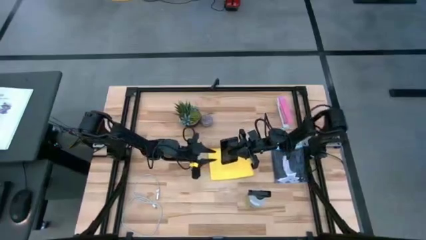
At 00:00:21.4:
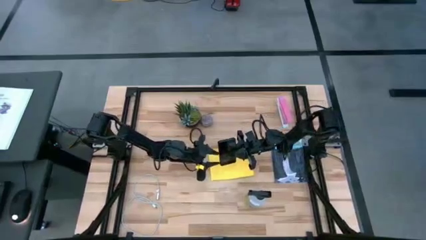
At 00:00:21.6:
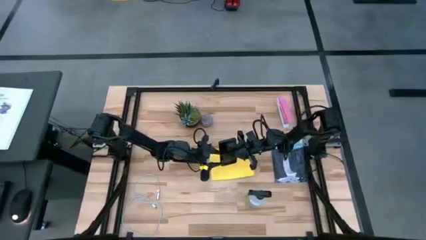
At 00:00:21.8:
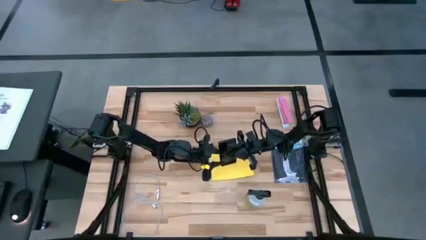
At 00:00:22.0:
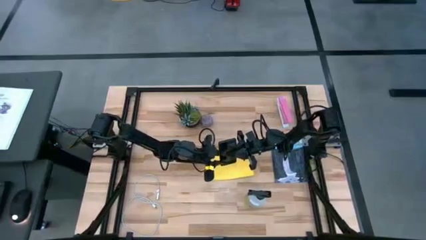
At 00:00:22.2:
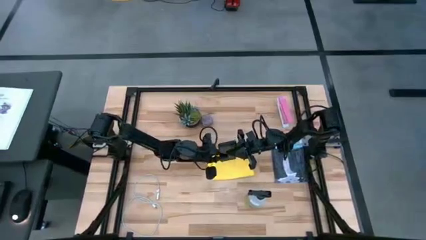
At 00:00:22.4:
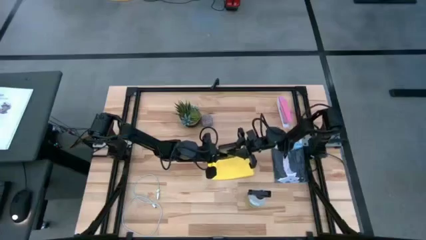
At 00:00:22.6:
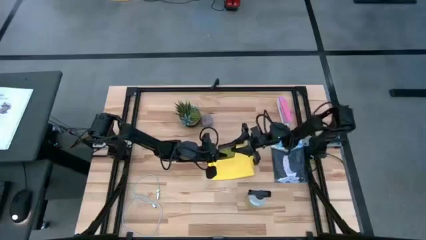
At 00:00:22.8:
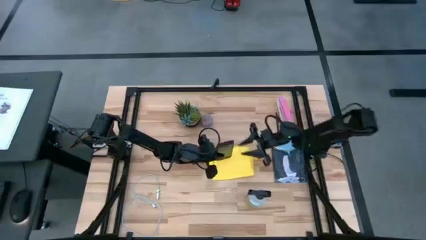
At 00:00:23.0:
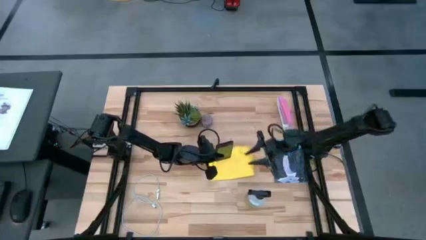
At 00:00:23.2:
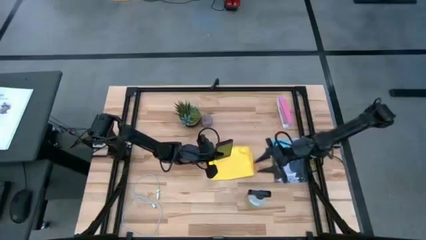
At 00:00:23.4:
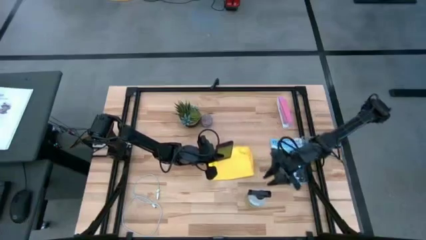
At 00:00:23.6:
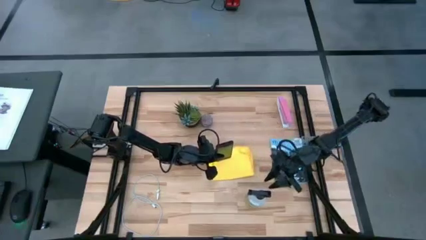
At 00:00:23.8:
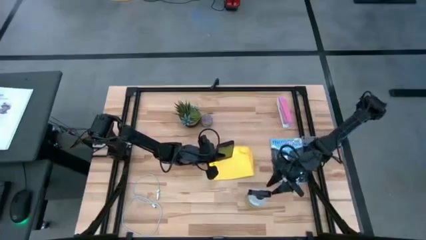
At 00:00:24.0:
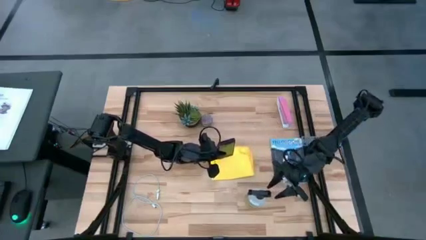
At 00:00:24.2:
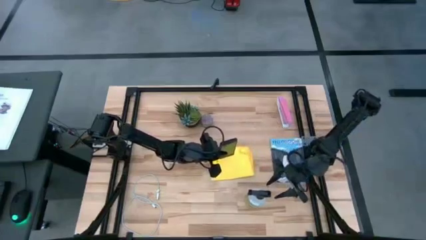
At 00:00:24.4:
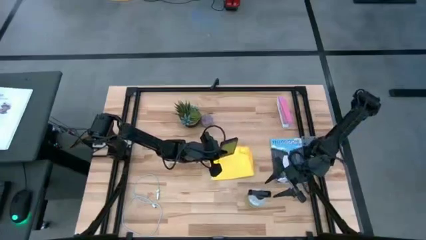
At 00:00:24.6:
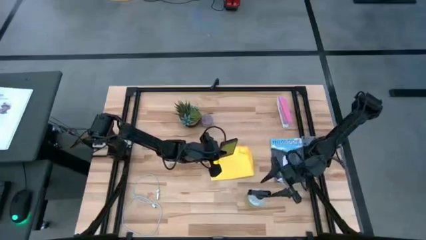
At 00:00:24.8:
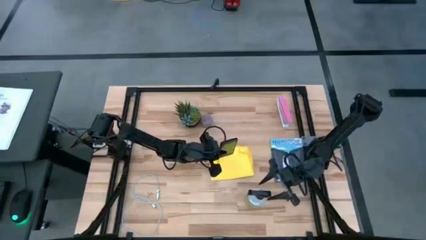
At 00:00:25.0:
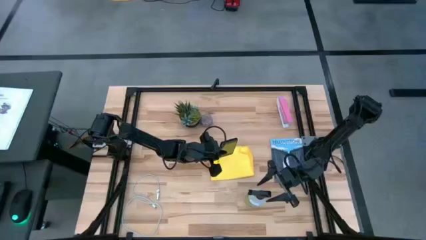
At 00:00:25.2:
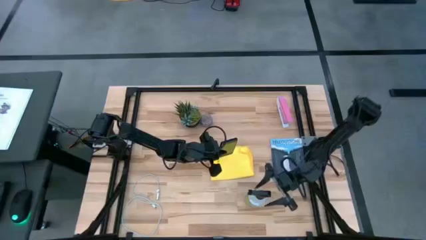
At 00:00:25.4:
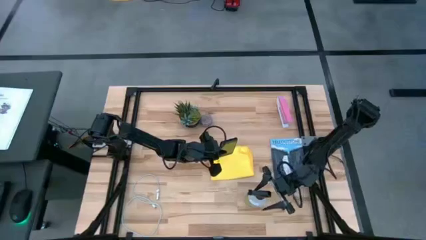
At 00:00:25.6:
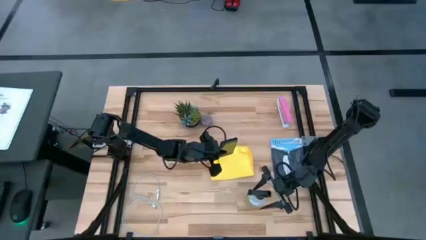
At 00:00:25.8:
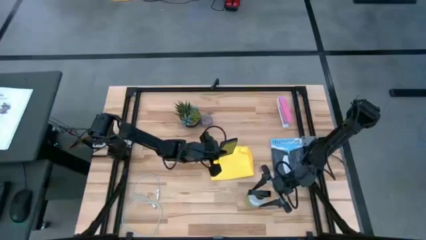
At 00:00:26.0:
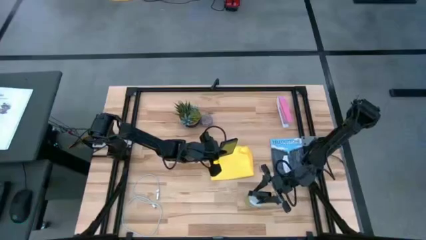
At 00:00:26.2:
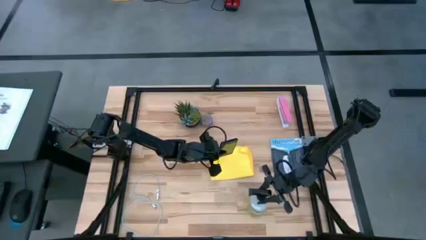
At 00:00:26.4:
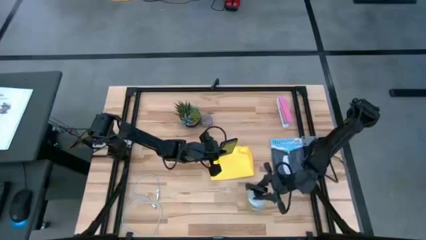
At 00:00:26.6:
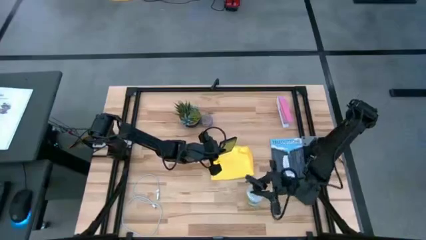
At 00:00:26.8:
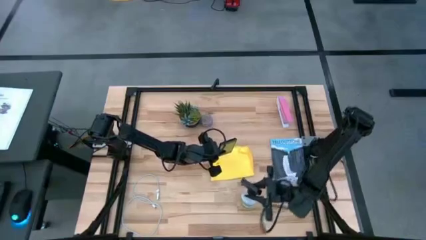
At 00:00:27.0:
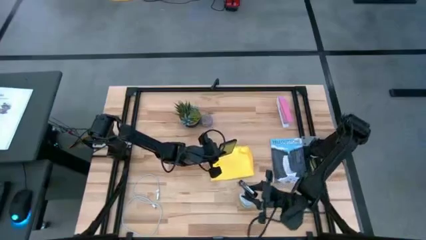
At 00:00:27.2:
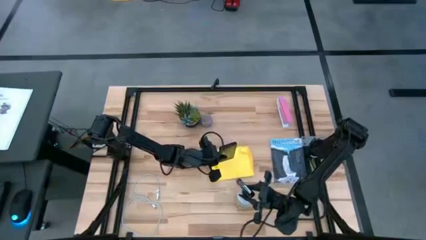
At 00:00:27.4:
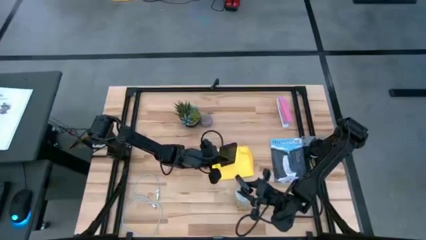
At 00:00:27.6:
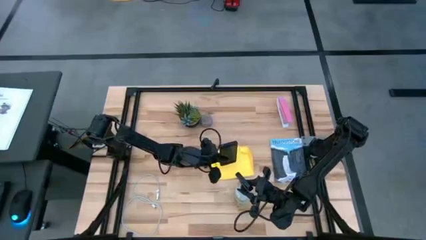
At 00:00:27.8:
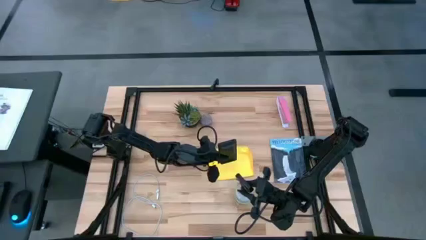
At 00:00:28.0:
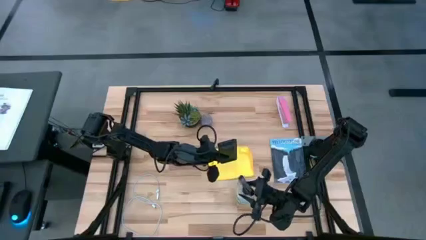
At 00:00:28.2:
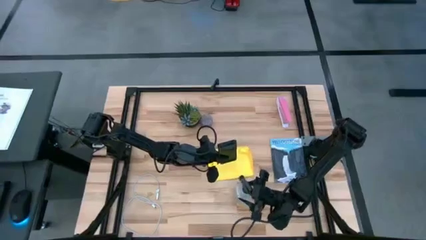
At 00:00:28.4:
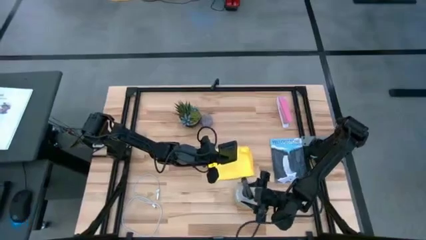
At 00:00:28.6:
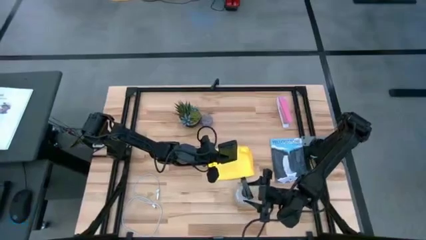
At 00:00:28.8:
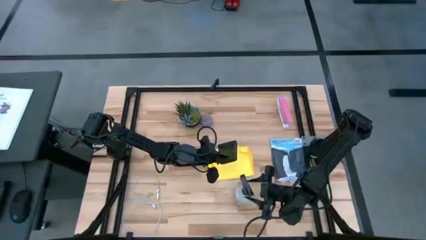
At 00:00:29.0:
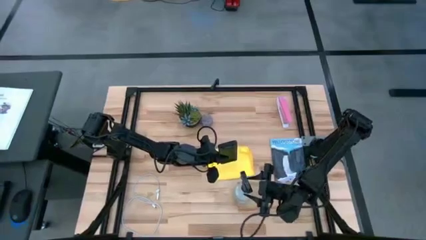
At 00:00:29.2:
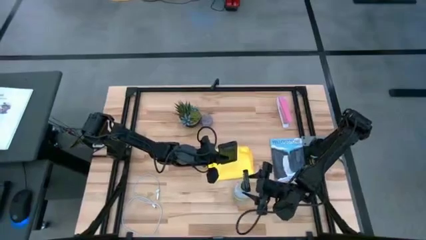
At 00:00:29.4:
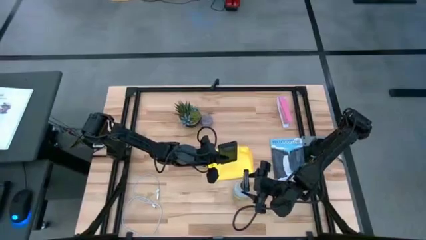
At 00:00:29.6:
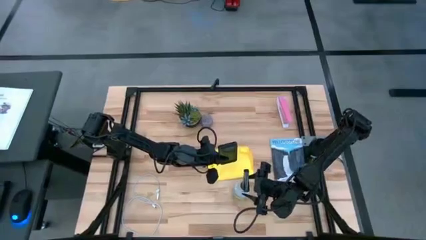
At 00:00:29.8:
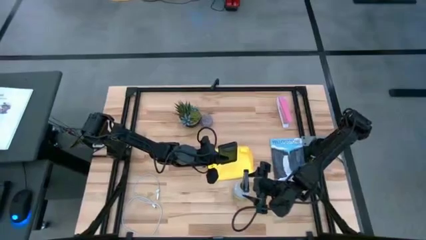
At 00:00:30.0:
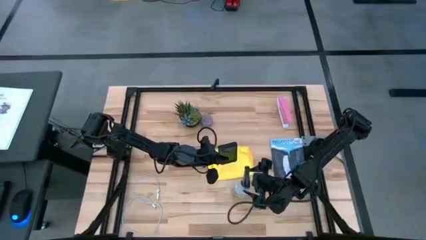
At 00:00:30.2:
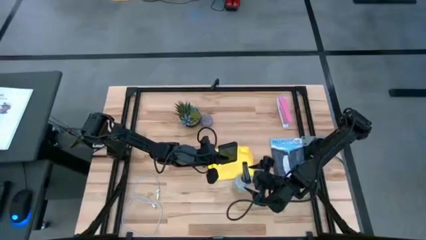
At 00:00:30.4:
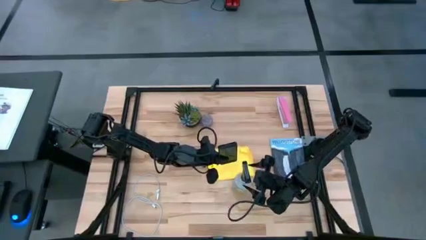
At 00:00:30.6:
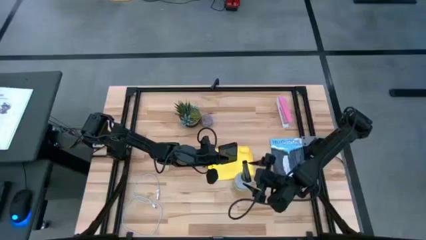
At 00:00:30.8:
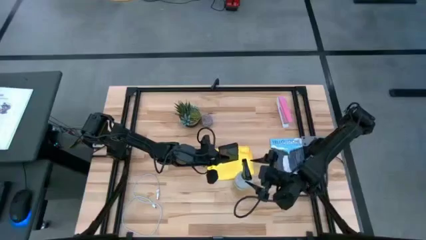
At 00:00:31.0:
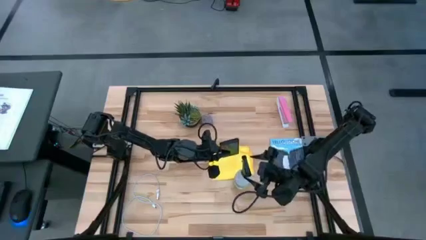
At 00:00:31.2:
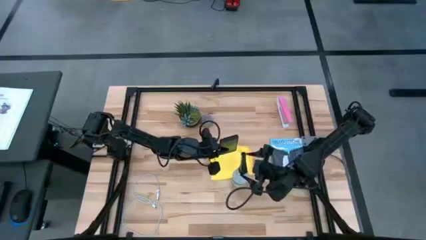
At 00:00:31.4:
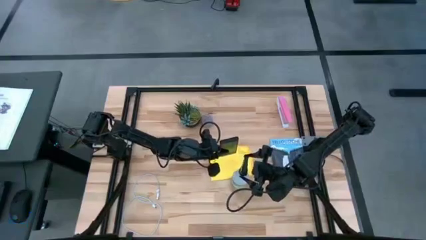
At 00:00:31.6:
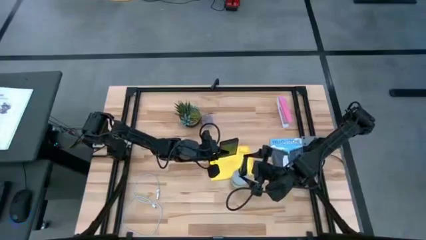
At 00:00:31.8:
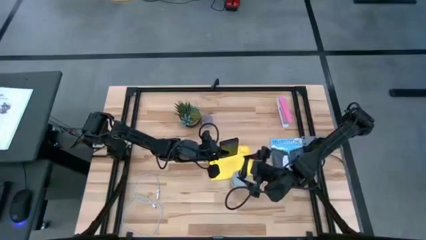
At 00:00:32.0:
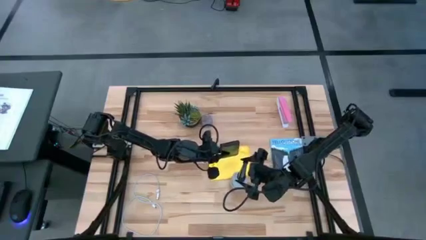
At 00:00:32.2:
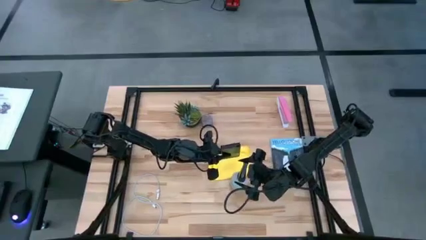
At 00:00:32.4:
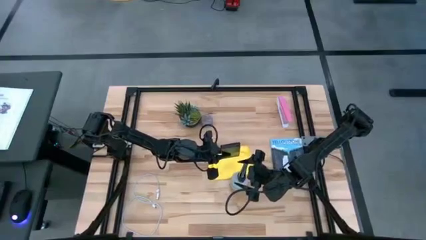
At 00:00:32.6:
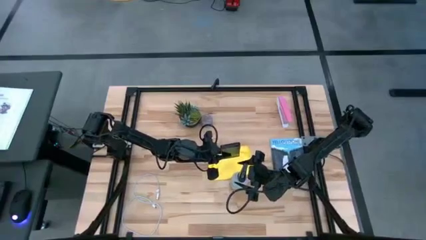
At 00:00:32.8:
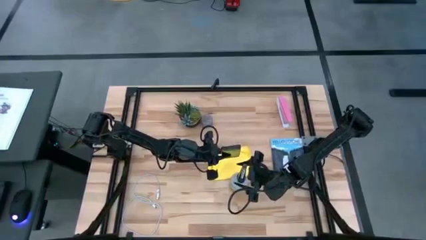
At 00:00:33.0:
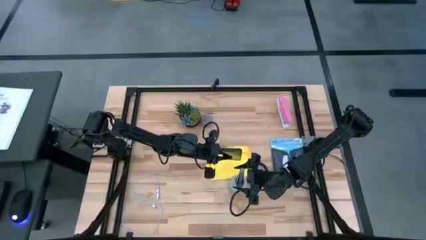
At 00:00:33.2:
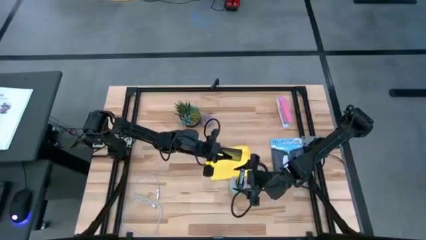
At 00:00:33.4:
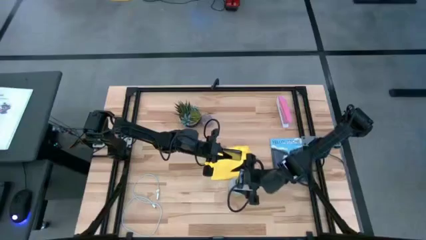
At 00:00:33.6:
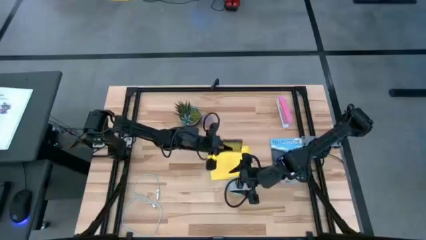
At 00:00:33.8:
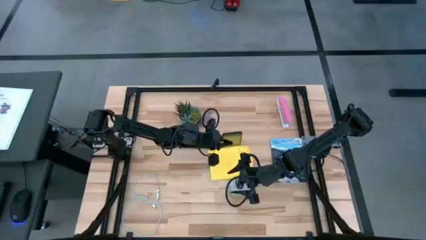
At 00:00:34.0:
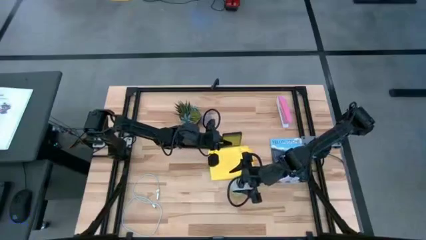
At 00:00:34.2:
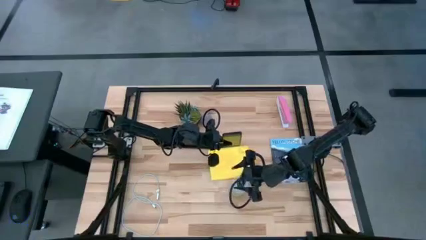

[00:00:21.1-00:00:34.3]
Task: Apply microfiber cloth
Spray the front side of the cellphone using a spray bottle
